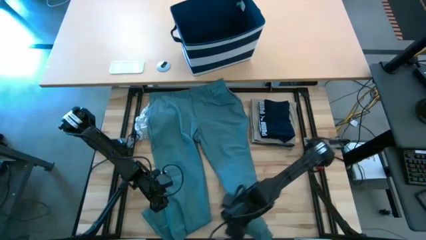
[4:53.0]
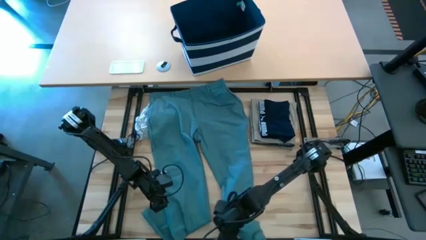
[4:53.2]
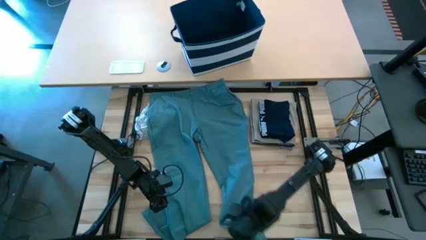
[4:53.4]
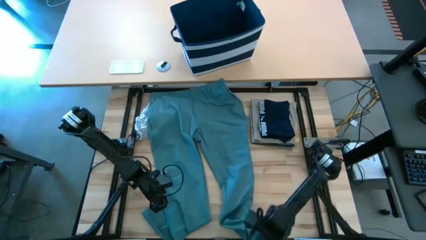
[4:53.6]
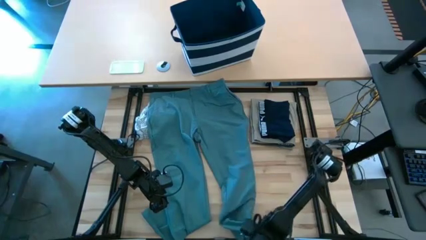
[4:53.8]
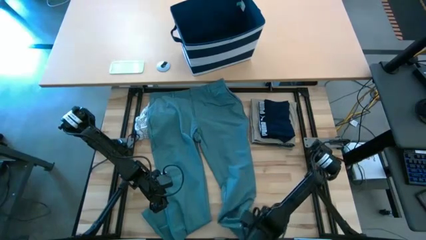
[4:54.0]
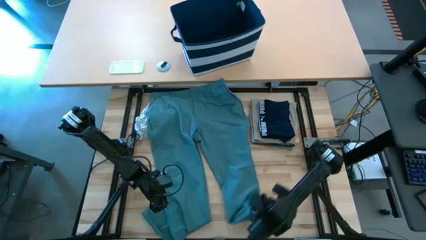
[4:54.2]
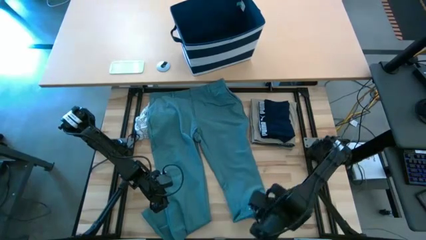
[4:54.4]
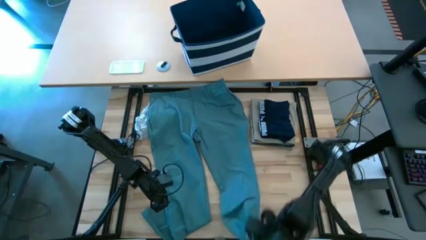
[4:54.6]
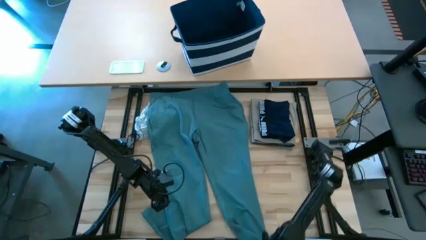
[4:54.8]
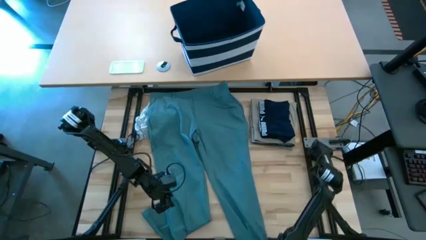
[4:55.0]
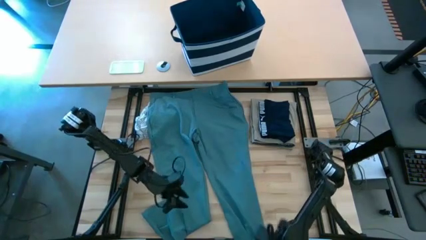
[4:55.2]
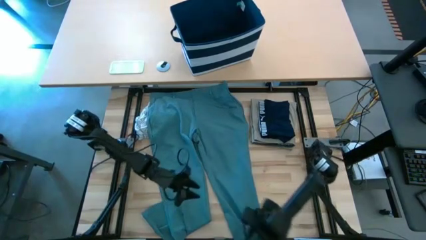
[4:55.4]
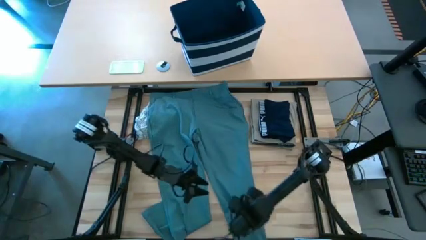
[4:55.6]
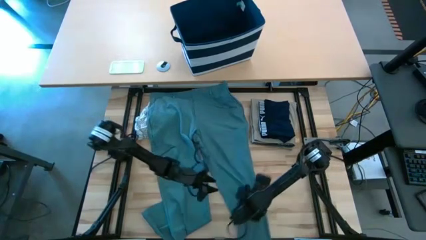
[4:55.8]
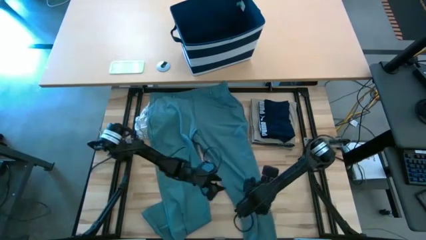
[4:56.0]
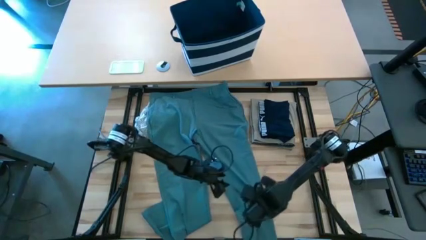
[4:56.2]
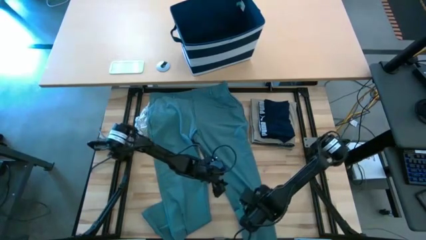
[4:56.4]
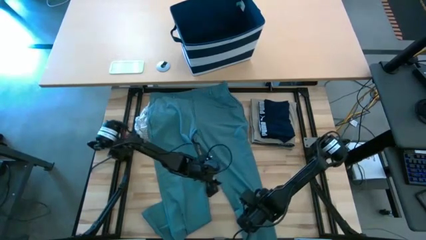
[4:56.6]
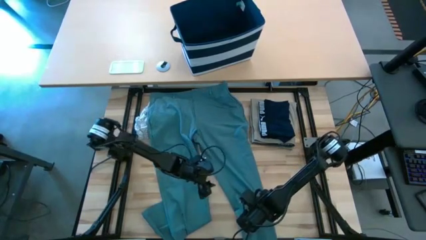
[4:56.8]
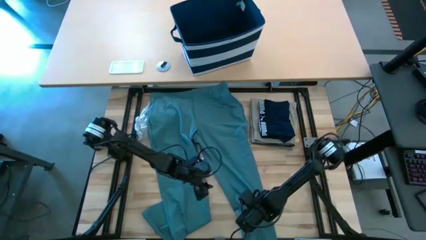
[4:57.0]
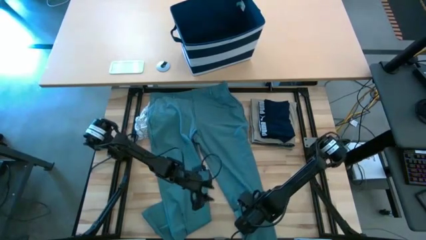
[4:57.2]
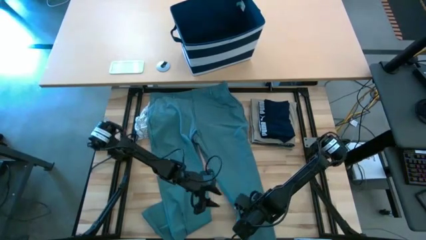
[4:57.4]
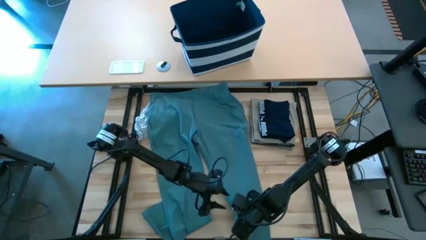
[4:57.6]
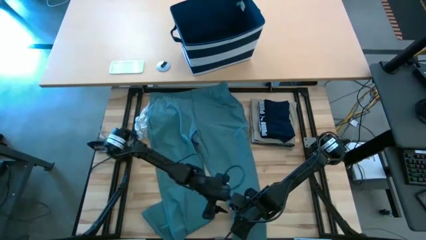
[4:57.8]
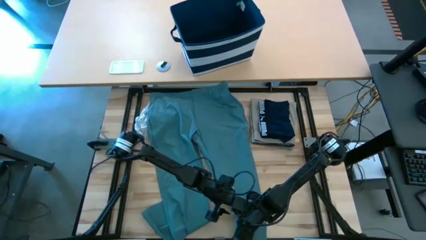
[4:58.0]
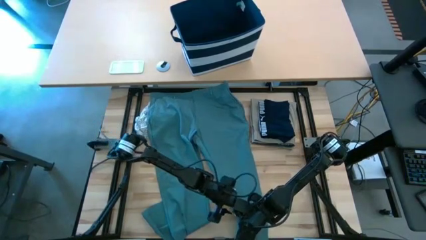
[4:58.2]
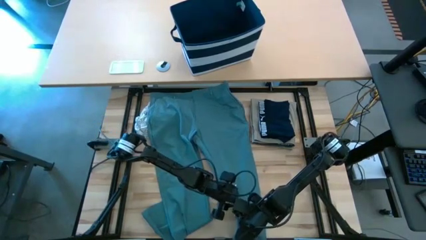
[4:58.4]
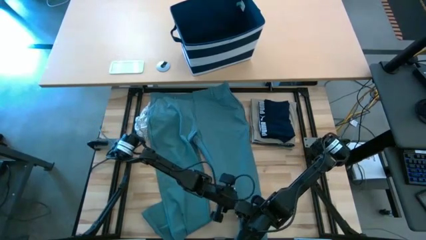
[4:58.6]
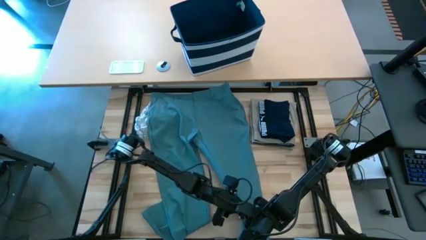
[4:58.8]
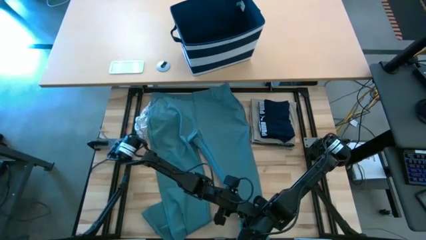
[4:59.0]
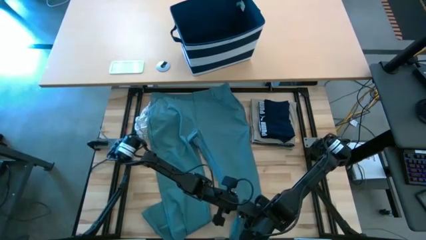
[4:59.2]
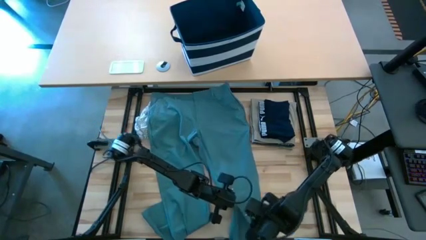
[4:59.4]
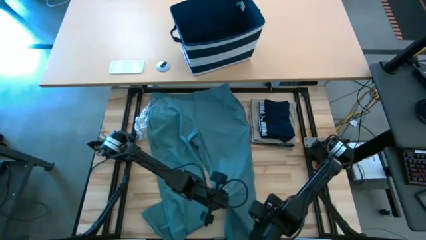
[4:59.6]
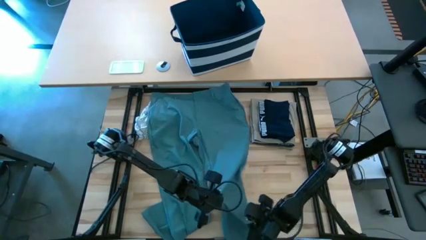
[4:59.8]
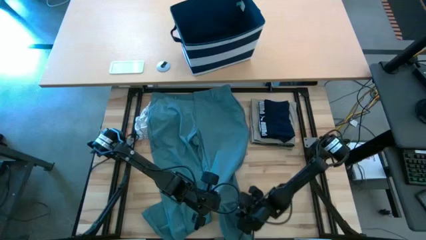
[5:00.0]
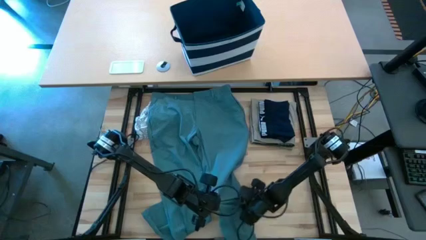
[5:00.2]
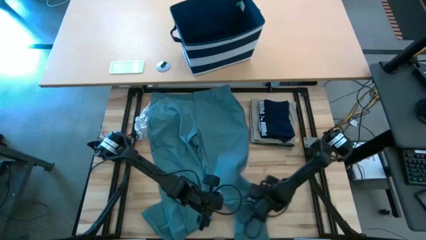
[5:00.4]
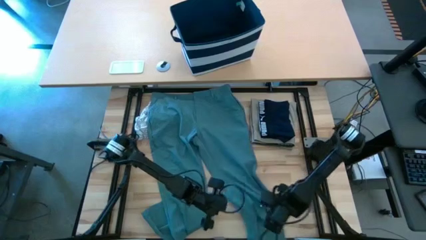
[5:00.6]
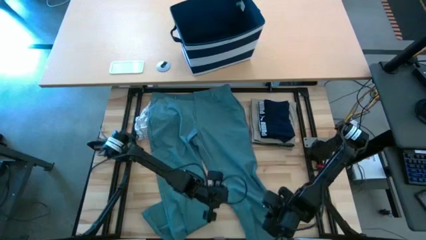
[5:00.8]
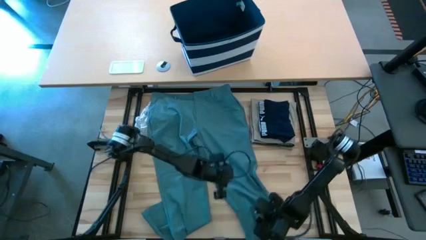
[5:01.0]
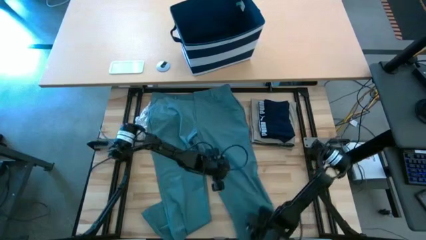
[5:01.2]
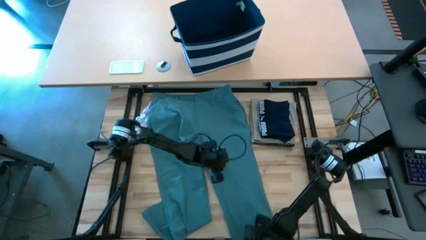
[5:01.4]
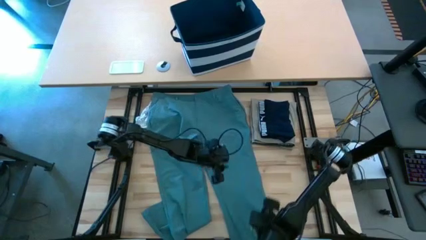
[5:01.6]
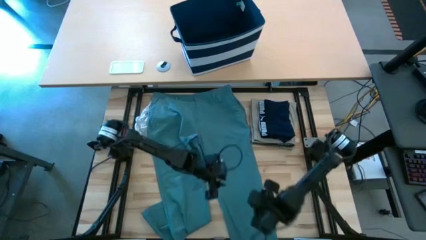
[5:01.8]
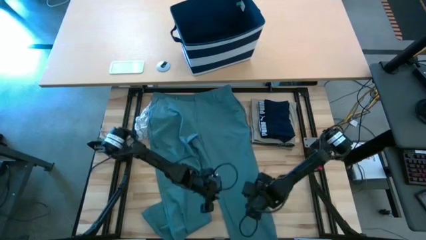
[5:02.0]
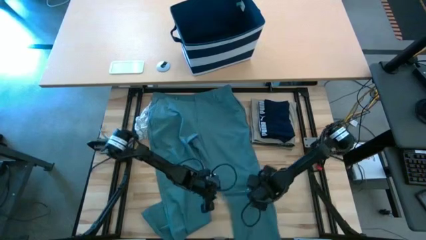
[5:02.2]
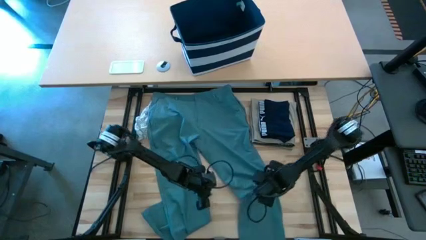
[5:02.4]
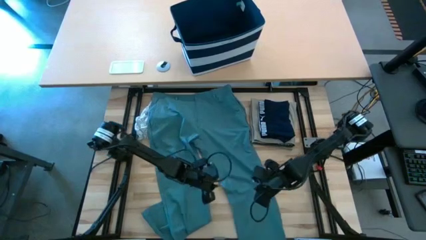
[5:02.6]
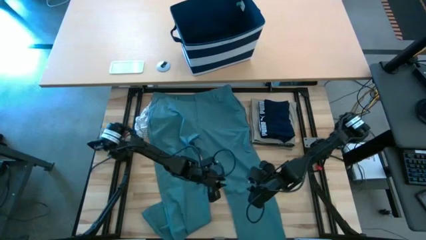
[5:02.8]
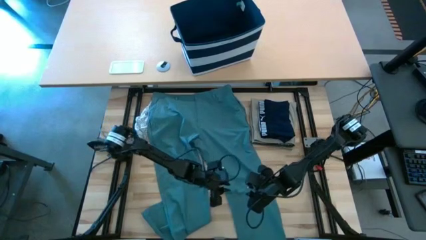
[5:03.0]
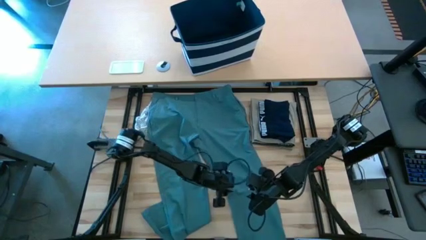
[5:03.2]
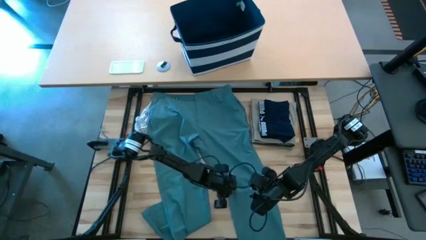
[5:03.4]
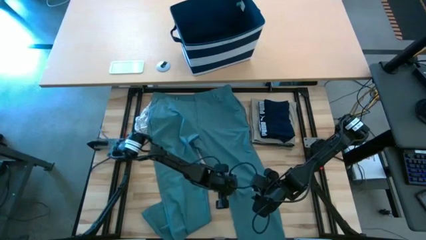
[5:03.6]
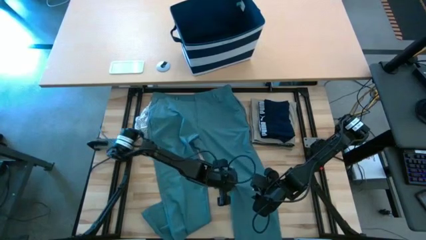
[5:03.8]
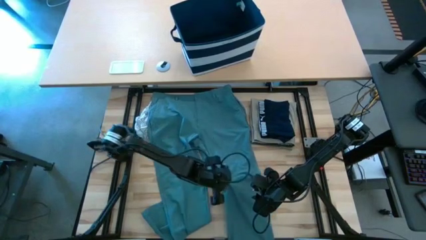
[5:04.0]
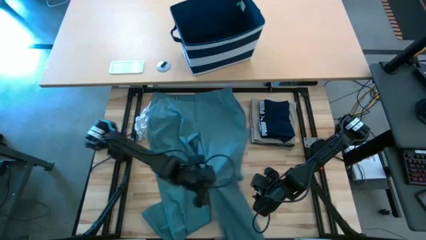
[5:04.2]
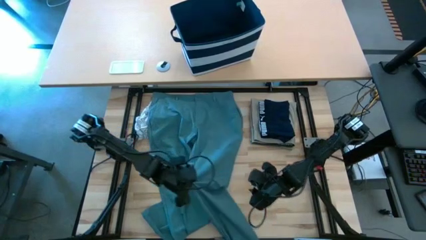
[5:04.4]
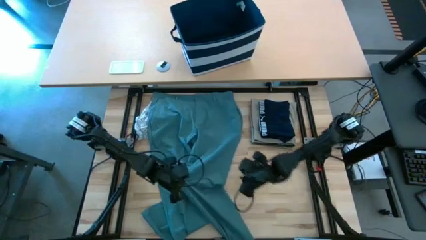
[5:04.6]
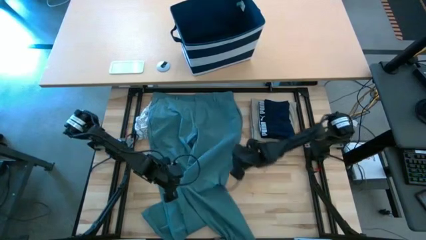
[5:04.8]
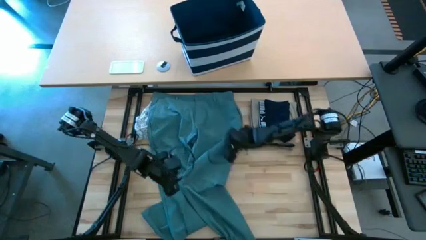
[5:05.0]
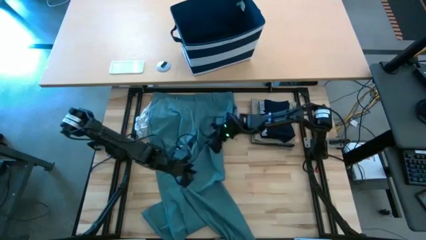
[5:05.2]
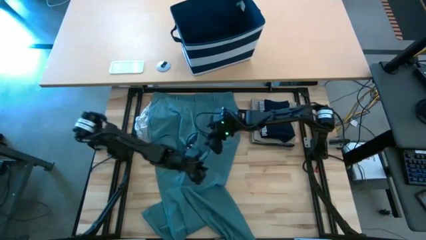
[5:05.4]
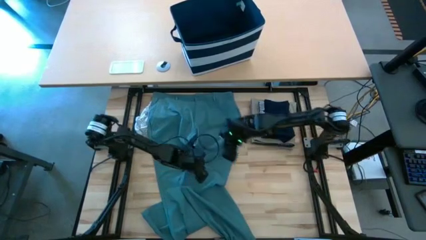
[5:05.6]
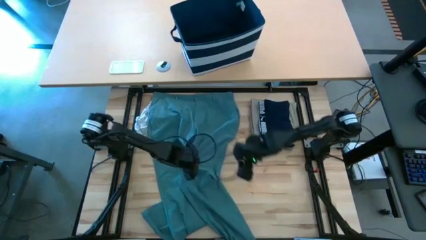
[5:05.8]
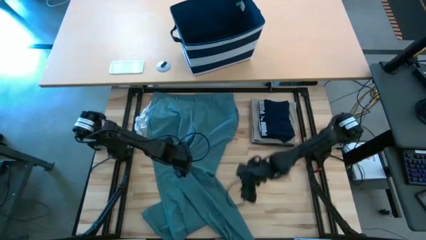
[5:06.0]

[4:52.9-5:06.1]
Task: Fold Laundry from Bin
Fold the blue pants

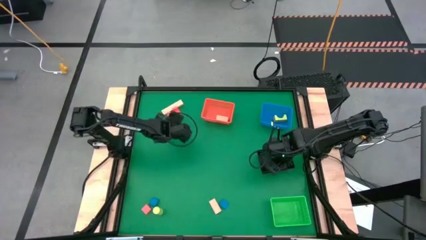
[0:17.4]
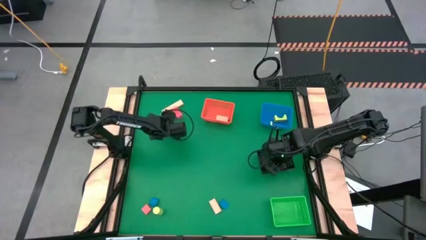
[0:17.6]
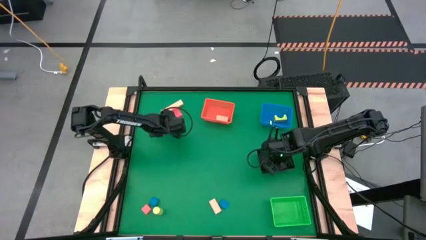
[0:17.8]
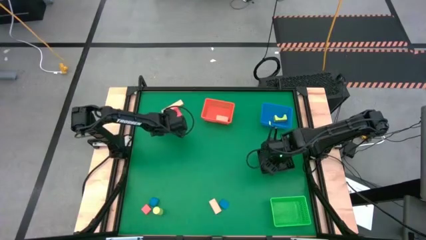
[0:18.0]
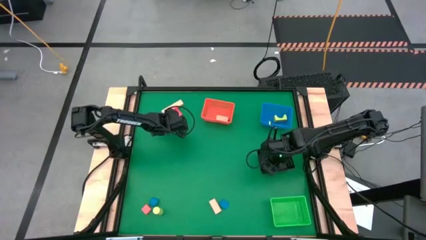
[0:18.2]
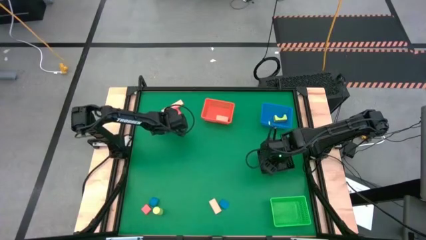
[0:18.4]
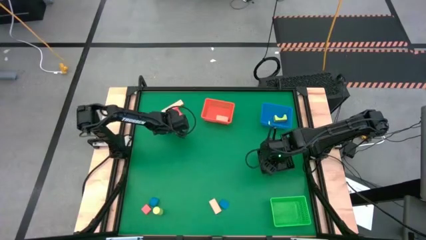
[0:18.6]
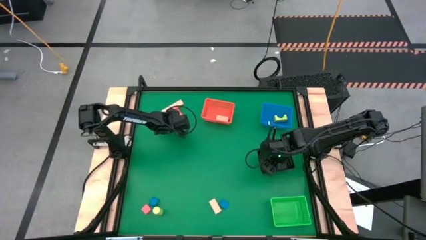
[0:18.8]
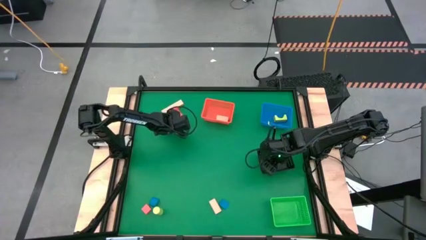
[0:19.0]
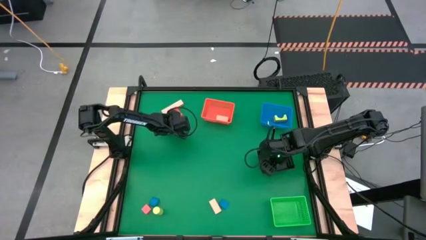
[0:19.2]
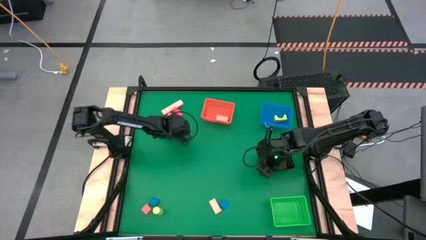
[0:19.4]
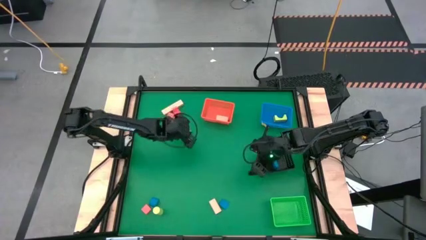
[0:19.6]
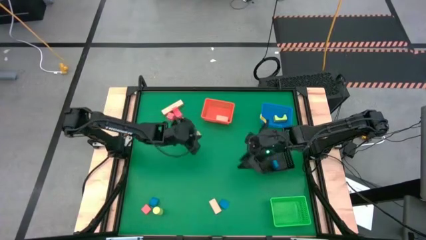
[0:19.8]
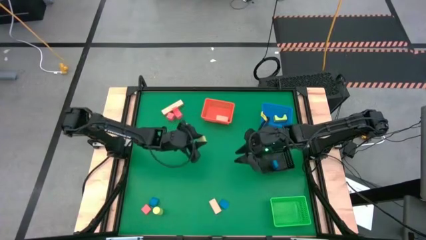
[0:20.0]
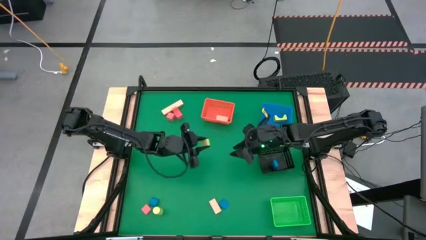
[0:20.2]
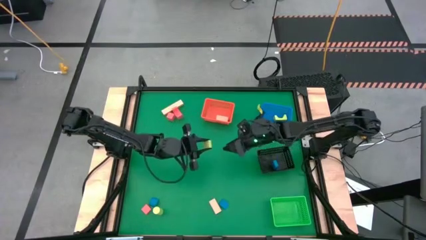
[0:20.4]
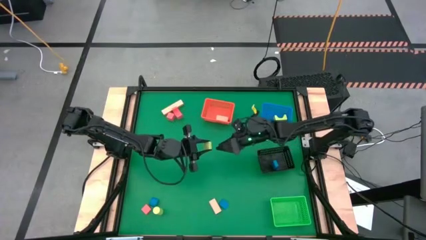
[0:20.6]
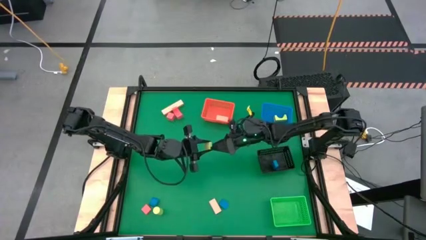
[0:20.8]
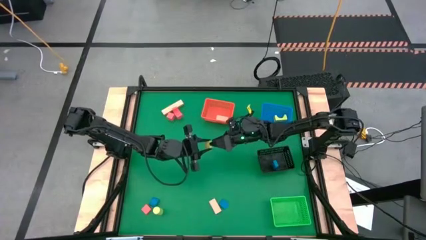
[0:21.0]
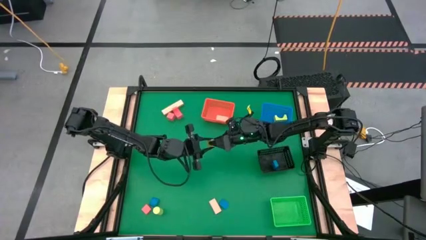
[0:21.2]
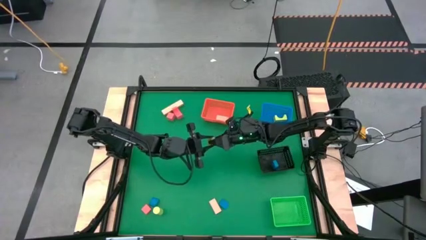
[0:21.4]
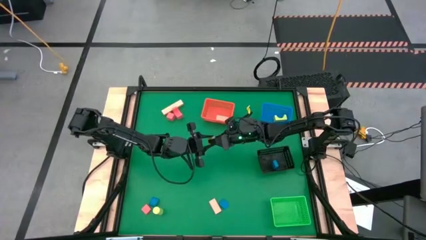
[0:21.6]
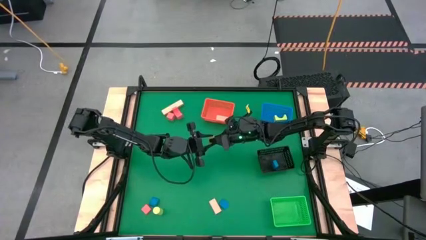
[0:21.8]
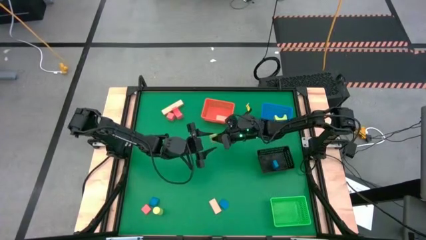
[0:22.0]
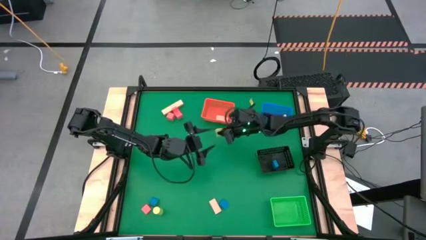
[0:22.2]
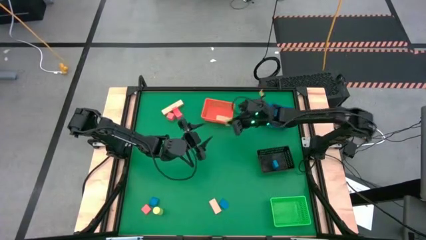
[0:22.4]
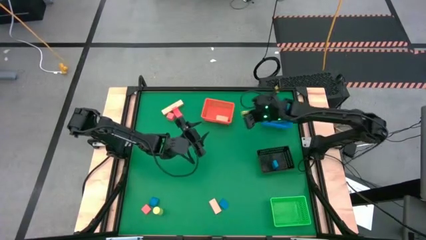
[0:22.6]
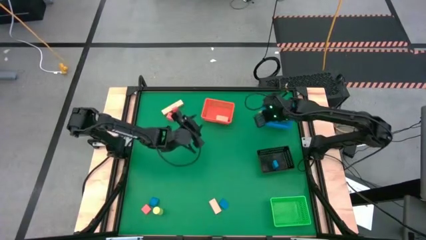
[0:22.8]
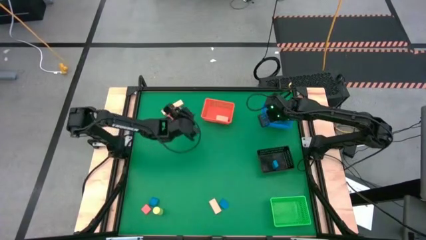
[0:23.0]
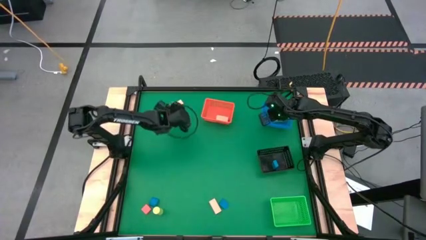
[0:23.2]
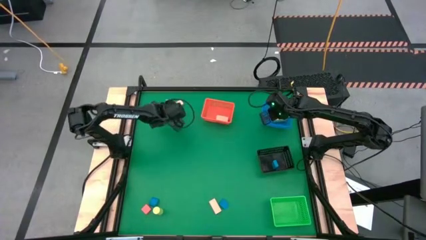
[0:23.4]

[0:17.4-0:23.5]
Task: Sort & place blocks by color
Put the top green block into the blue bin
